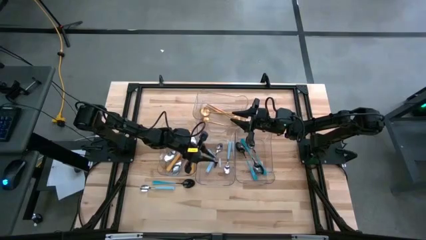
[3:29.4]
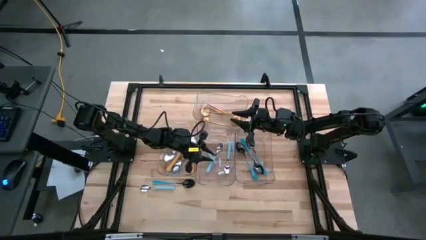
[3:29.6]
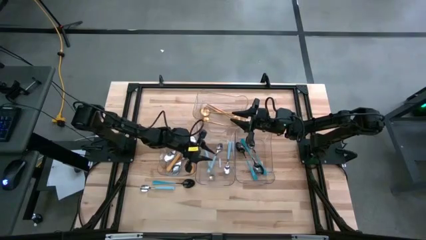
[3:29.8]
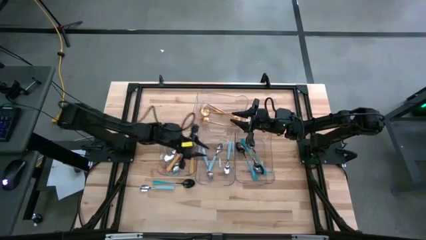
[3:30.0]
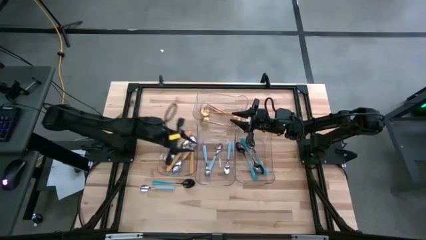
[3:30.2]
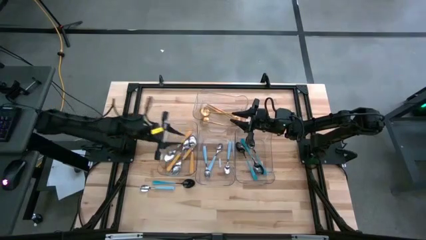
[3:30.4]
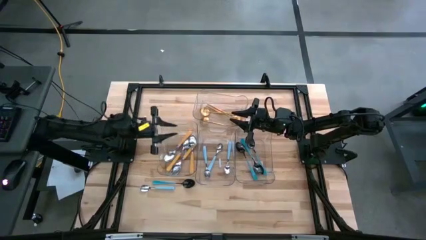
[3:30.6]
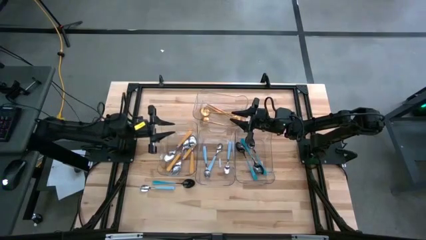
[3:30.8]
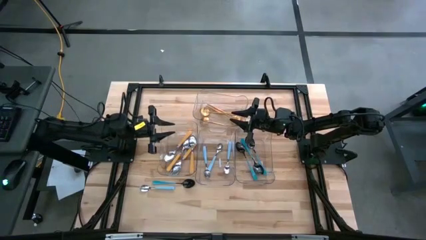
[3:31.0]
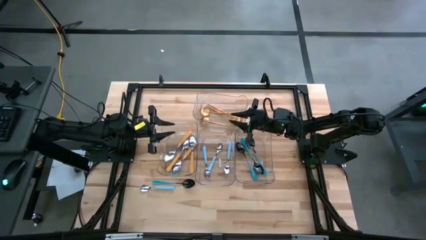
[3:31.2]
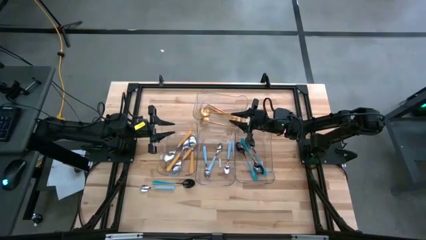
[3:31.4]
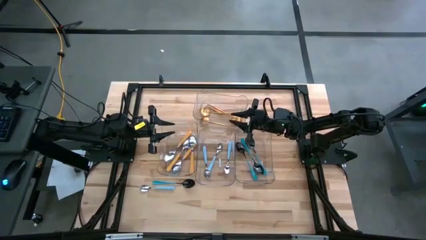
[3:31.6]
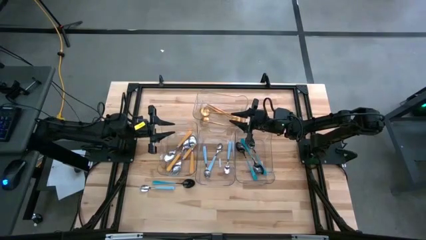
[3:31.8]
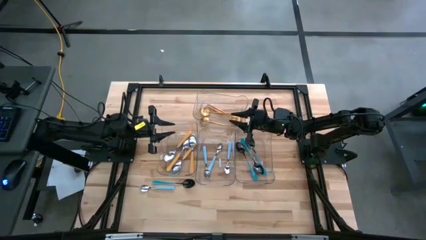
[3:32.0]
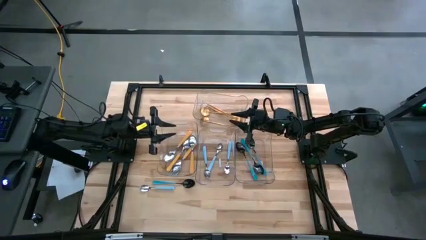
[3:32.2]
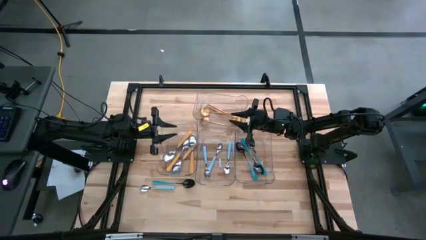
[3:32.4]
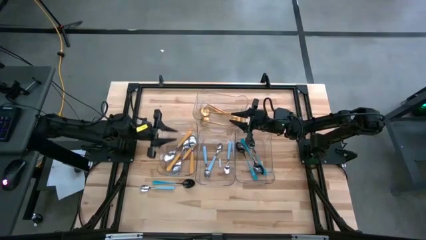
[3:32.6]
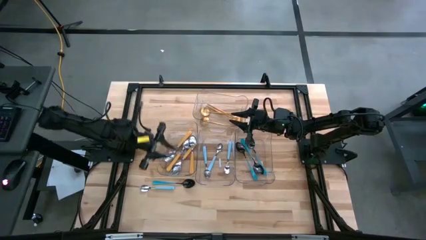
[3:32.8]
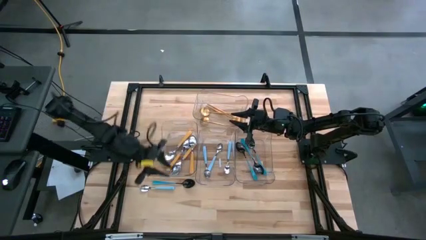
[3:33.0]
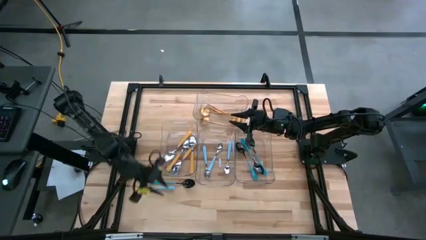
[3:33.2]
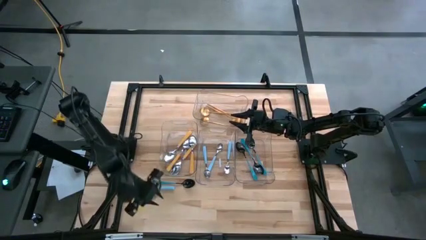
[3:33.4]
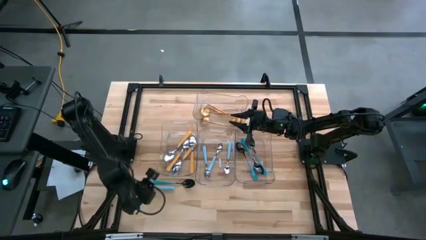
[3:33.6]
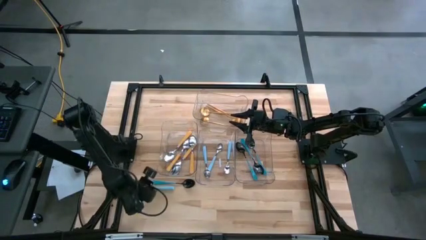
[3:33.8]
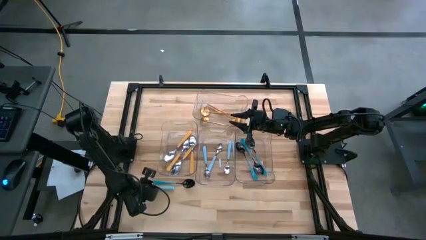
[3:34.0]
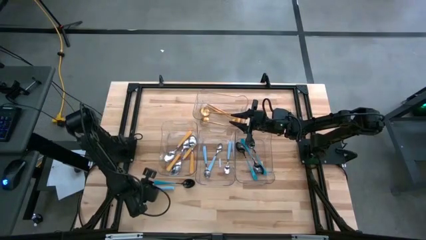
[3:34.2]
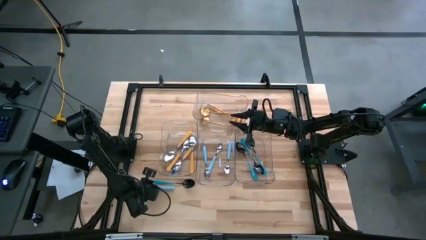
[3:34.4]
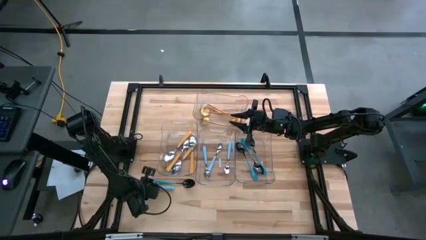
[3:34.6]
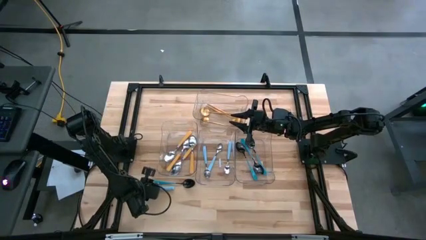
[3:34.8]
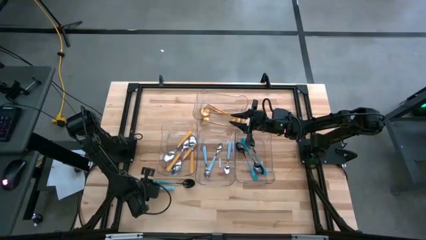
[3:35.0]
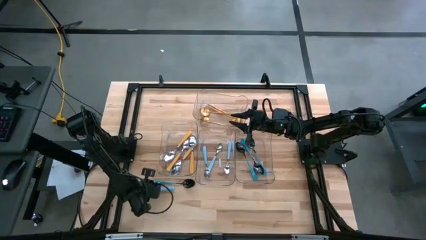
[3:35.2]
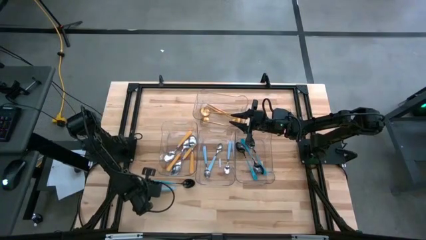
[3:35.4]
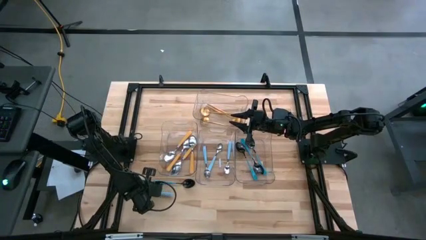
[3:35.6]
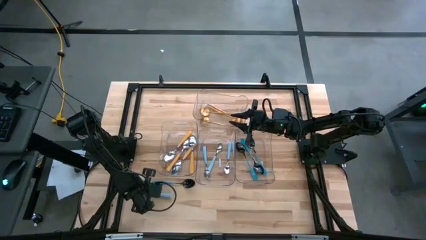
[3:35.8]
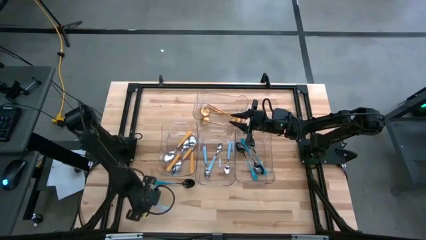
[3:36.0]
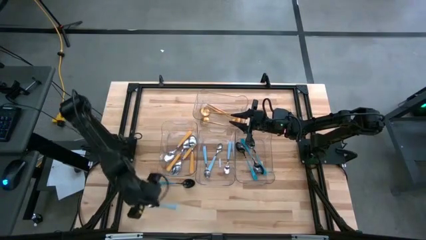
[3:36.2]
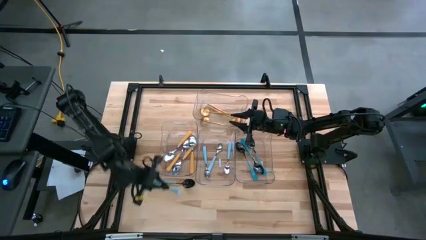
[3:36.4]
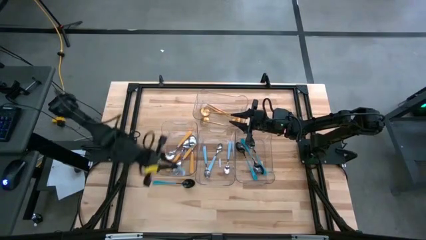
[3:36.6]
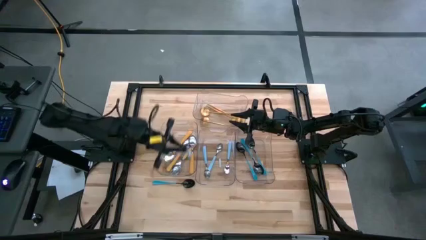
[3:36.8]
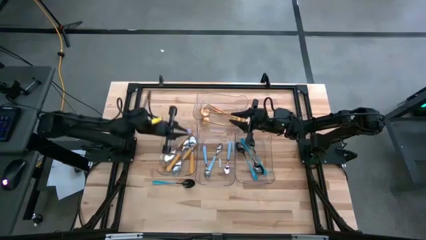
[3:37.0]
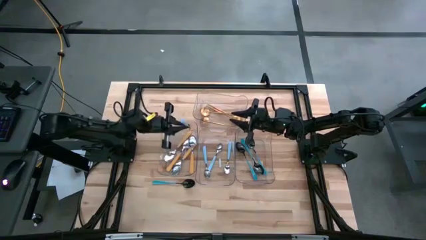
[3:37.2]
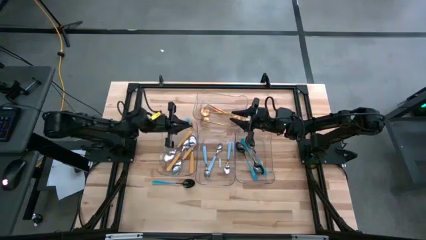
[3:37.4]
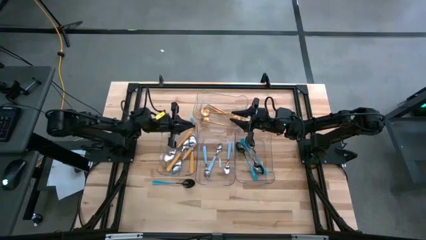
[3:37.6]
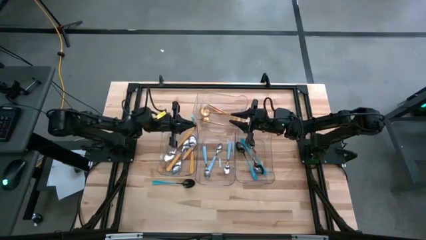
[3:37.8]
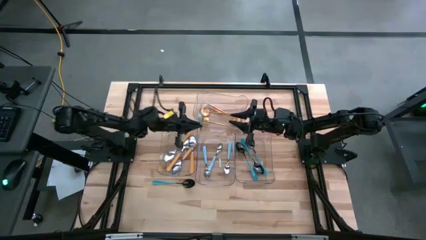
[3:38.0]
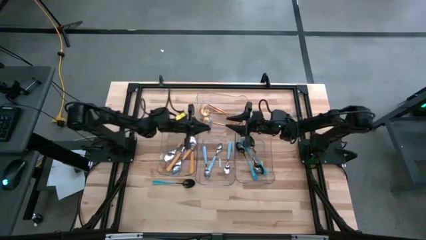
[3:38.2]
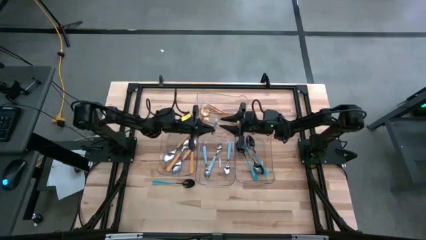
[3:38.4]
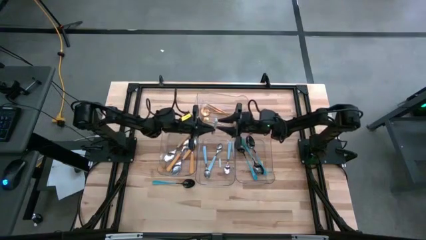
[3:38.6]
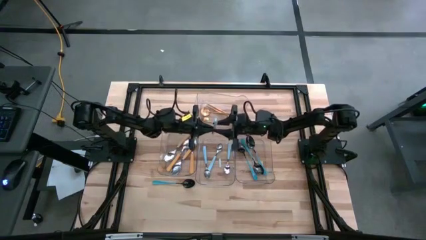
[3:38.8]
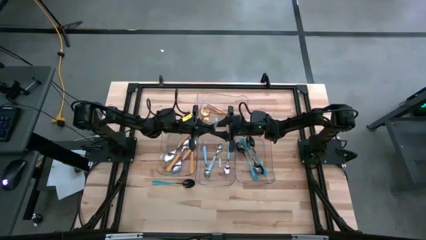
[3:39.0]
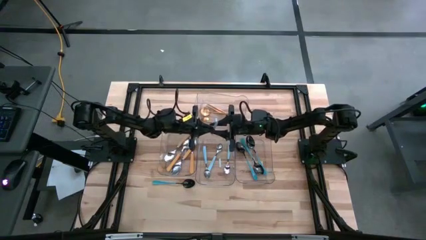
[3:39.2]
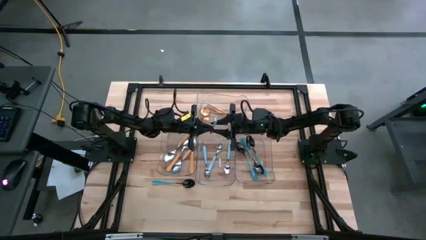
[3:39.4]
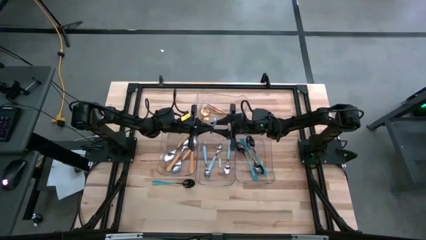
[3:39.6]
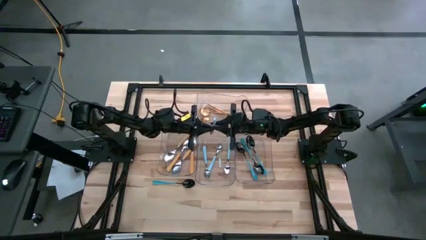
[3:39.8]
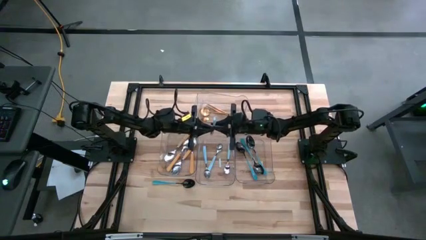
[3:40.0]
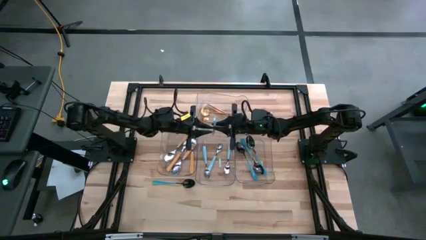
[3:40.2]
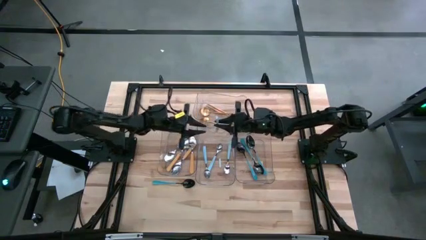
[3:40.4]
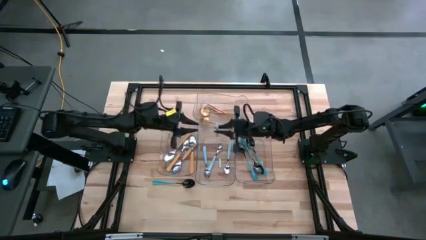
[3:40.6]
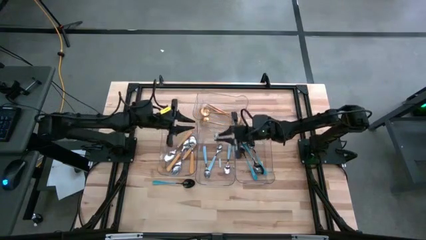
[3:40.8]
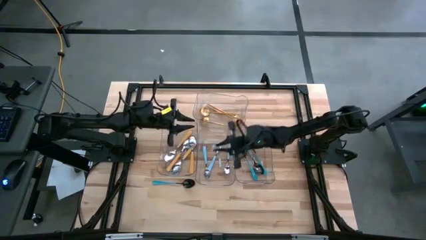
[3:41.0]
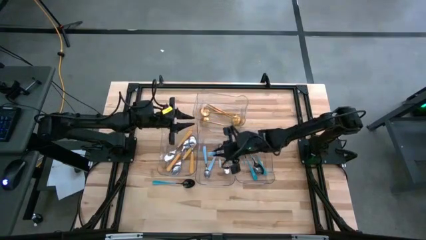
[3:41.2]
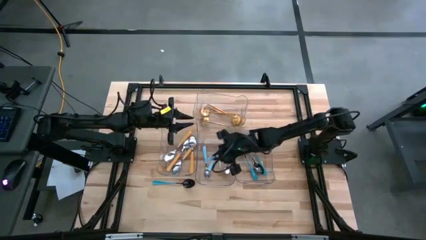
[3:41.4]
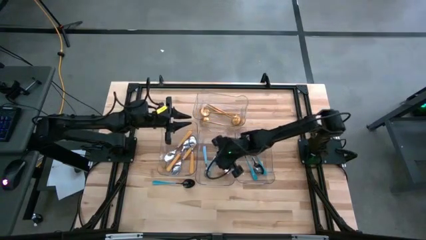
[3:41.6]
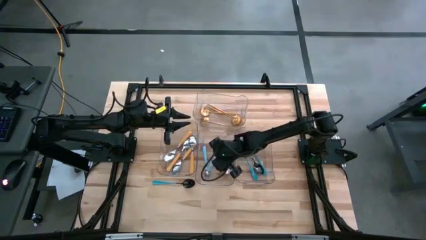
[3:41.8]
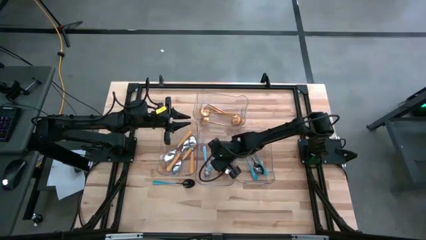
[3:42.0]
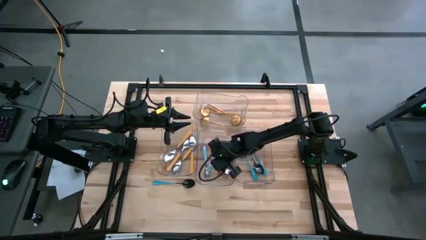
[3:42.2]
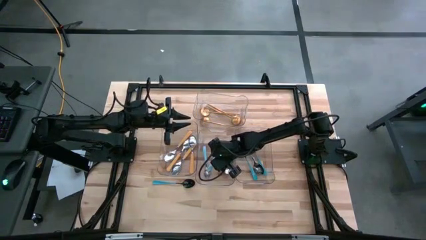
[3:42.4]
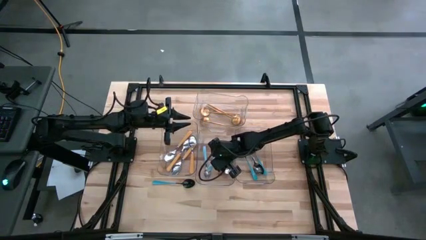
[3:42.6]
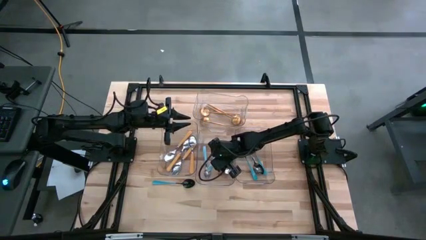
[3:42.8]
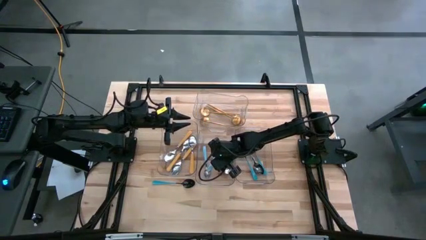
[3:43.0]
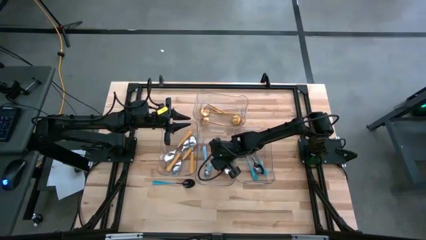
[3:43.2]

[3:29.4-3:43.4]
Task: Sort silverware by color (type)
Put the light blue spoon into the middle transparent bin

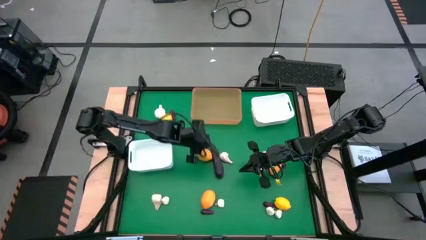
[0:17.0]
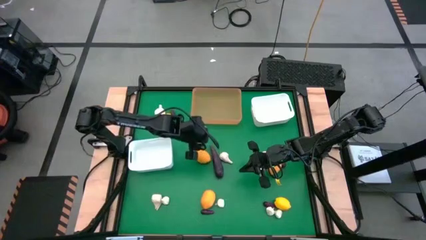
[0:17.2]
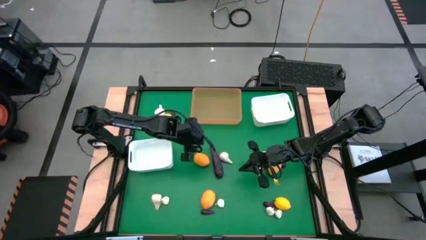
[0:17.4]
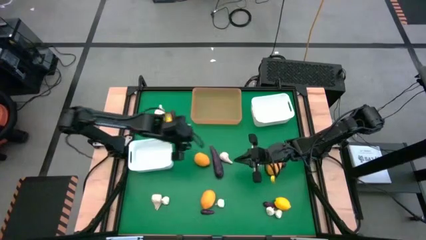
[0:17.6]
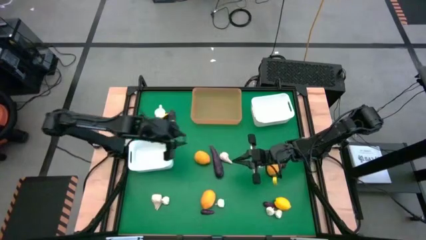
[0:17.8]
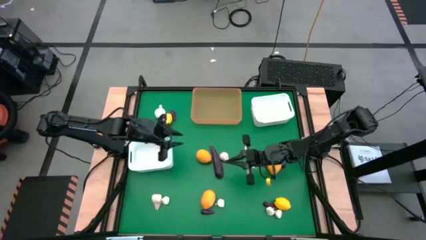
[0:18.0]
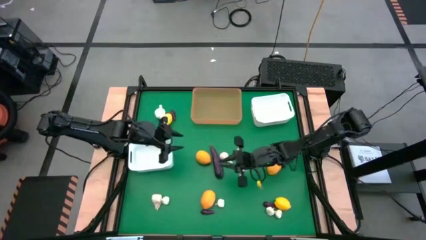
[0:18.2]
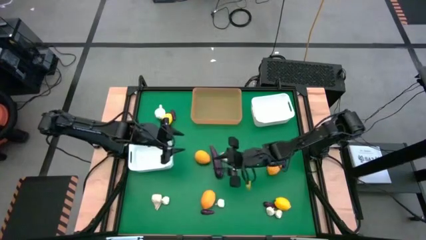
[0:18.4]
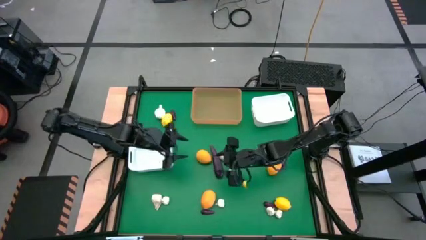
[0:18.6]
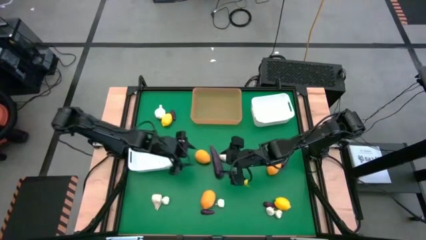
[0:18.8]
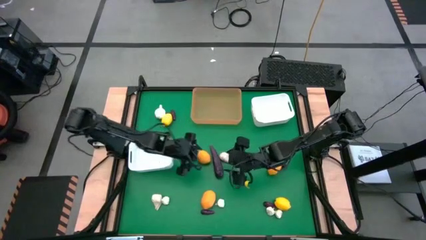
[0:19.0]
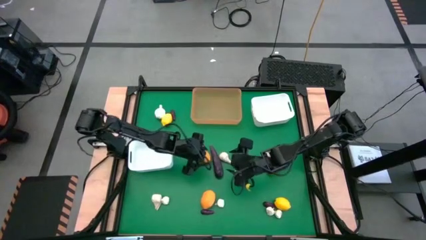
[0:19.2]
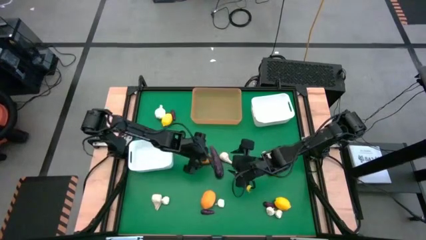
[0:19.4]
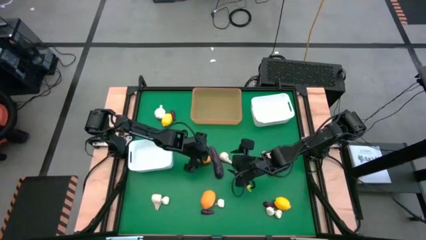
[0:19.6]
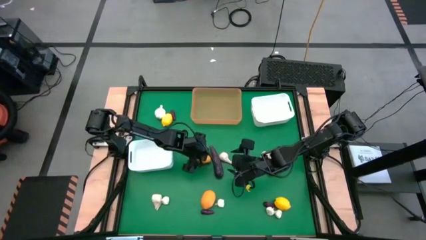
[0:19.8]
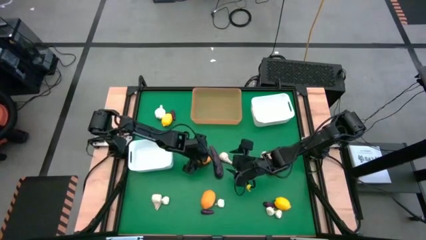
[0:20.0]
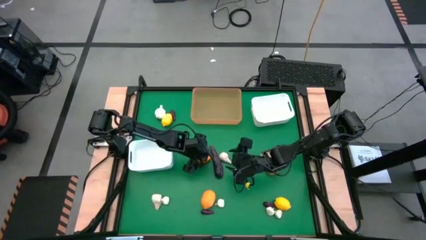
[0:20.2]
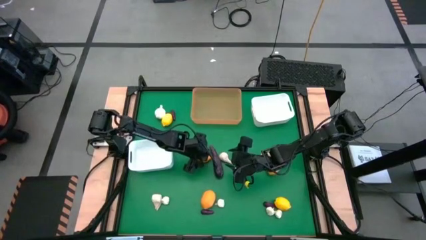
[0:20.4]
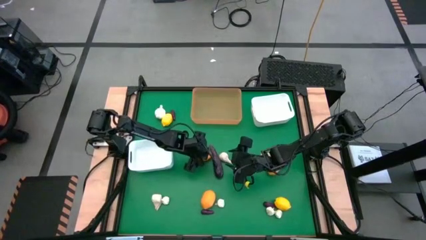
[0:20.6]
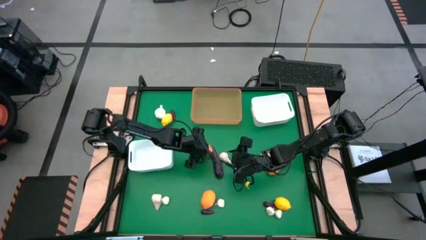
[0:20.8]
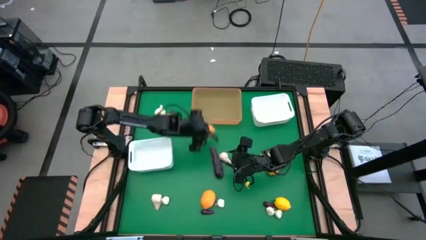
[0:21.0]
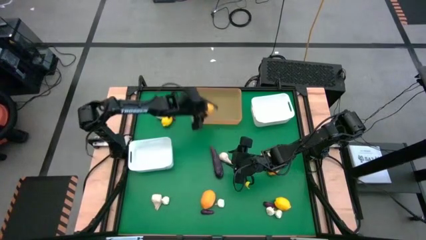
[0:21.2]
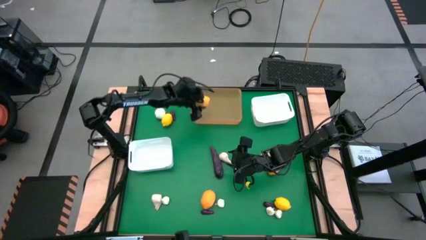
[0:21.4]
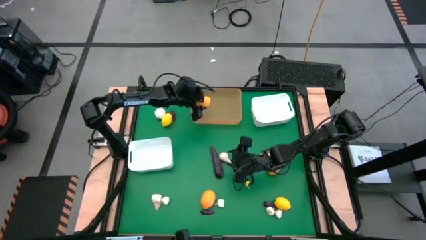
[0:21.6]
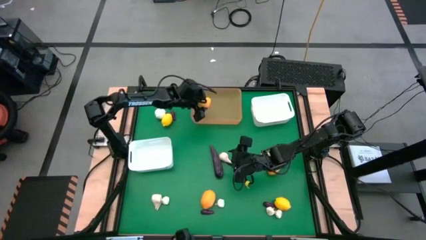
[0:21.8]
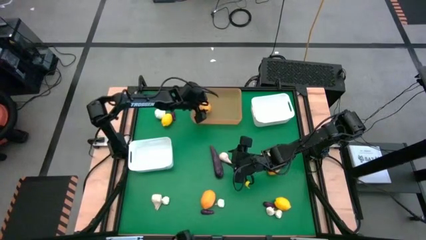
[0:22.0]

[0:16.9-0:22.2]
Task: Sort produce into baskets
Put the lemon into the yellow bin
